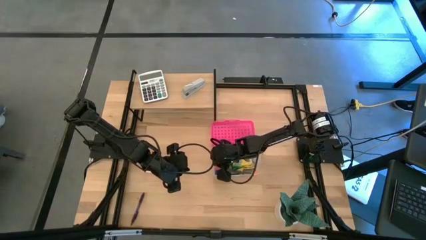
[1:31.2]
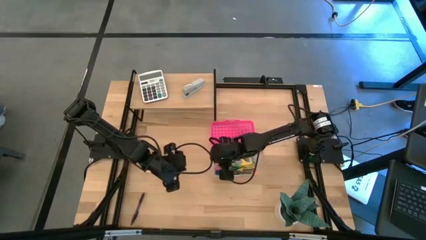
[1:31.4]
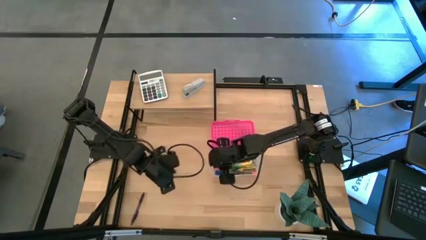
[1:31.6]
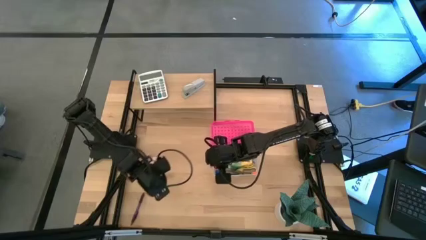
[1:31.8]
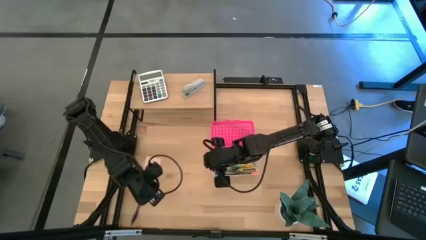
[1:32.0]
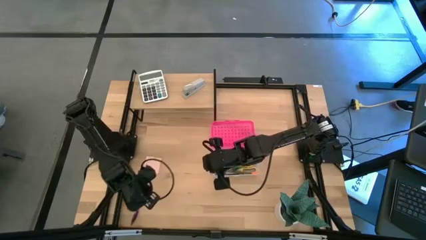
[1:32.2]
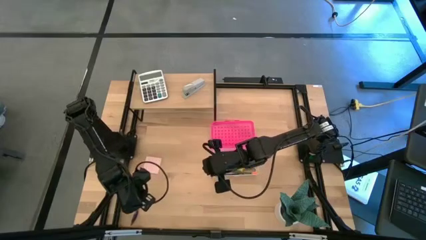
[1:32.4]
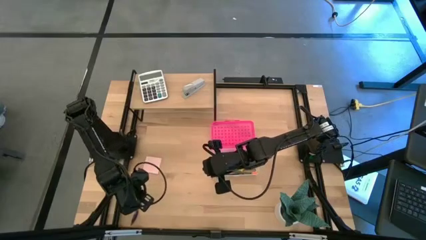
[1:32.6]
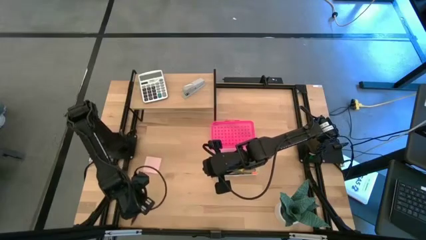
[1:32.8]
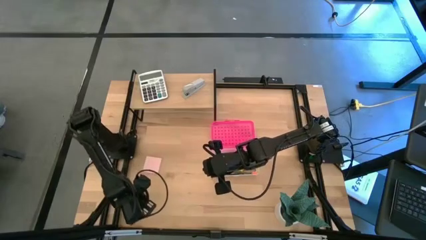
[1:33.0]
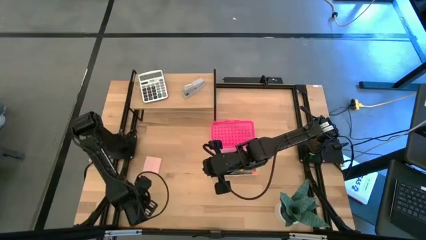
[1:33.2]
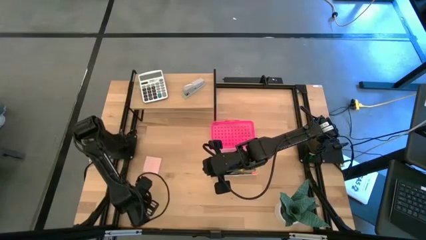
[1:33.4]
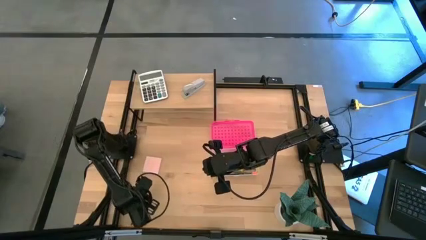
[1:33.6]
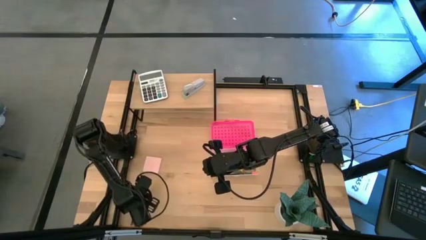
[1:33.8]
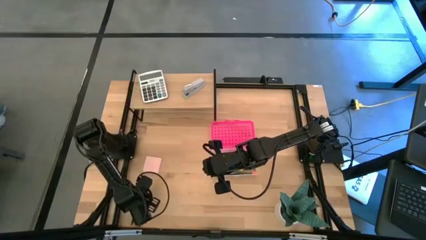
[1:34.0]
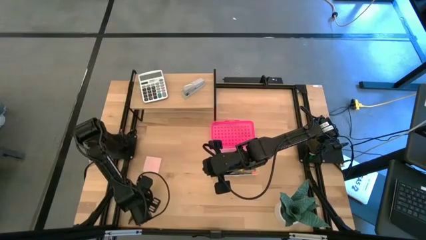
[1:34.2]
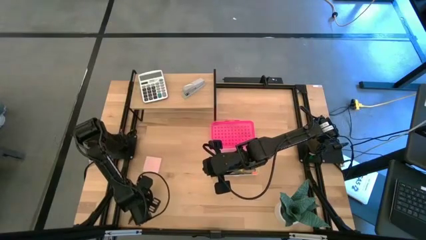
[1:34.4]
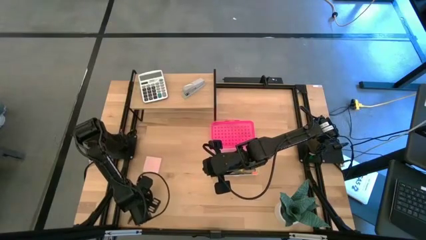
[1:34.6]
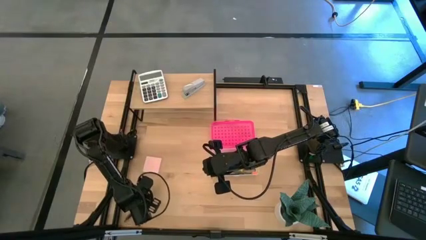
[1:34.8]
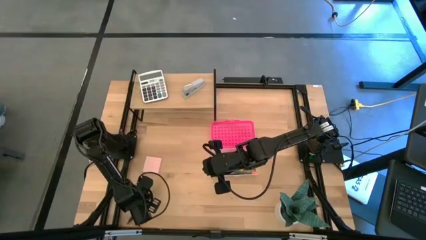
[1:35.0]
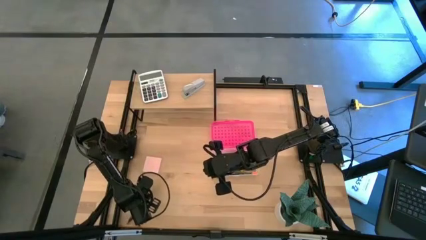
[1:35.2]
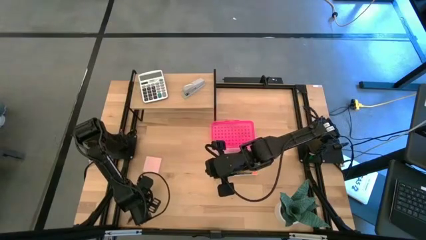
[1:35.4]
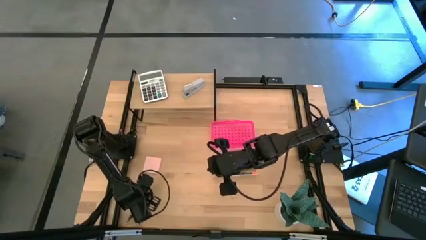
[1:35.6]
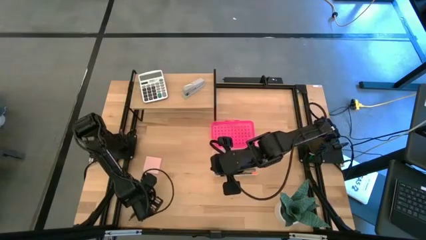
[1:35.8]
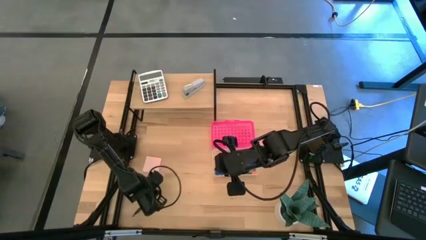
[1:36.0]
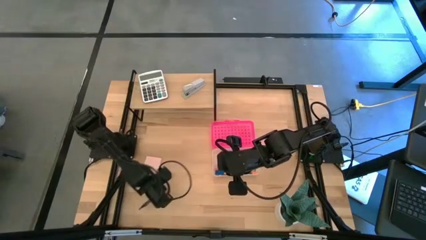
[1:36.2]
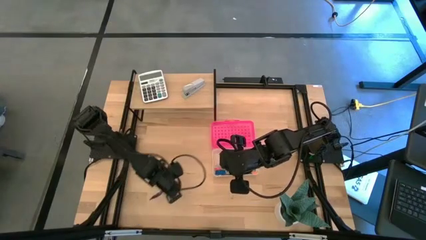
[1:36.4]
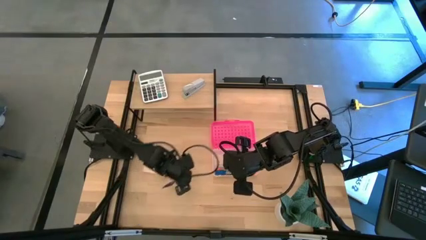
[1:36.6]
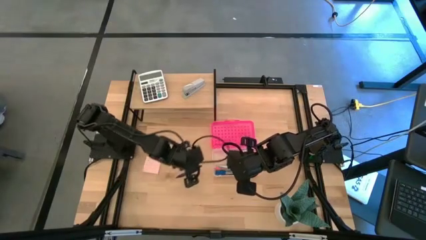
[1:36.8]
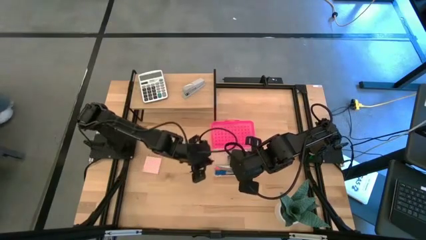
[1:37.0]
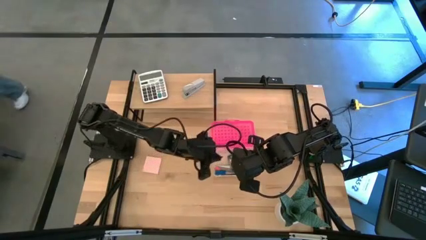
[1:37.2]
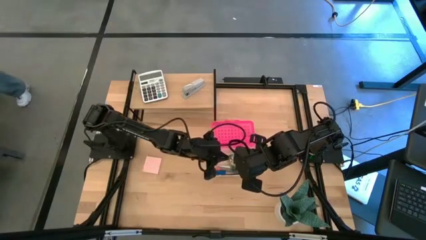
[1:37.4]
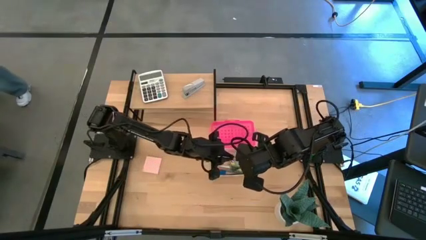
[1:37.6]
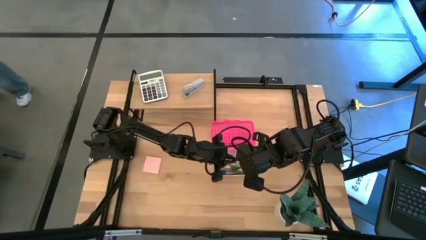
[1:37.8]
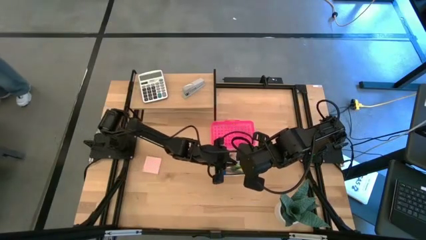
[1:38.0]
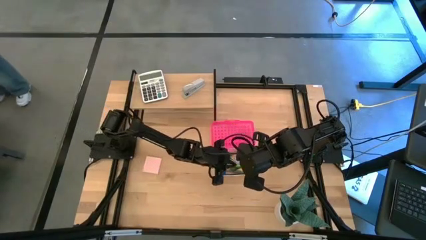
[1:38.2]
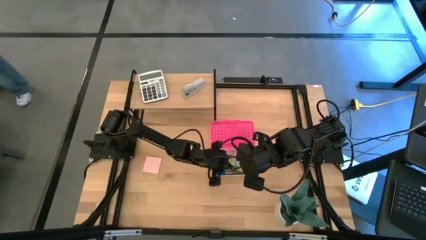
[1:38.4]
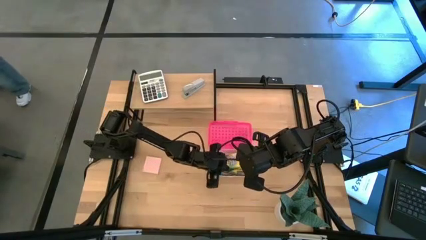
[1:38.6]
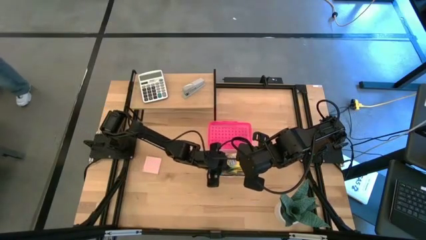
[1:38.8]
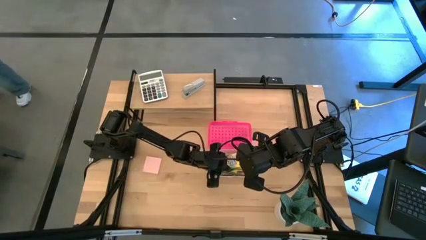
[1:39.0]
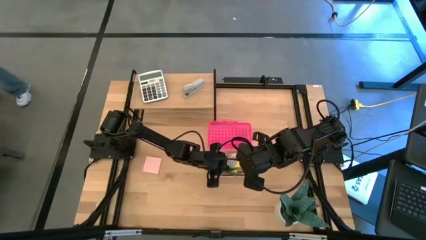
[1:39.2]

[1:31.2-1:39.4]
Task: Pack school essentials
Put the blue pen into the pink supply box

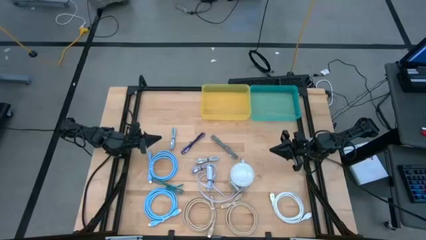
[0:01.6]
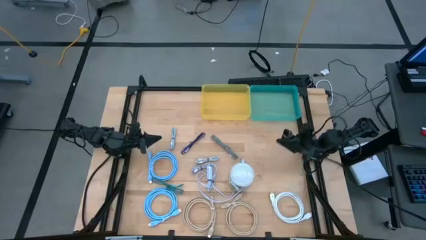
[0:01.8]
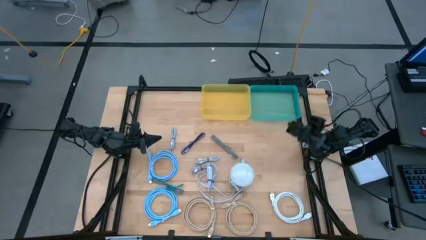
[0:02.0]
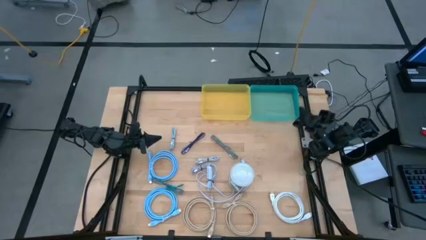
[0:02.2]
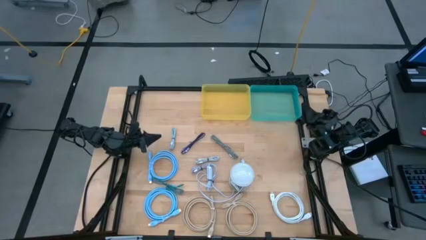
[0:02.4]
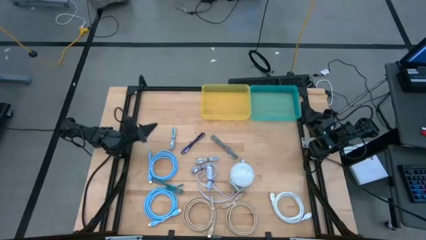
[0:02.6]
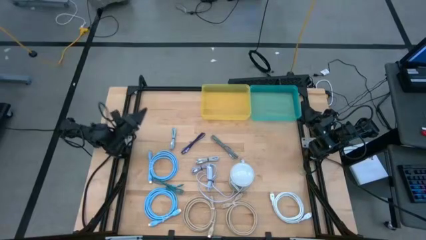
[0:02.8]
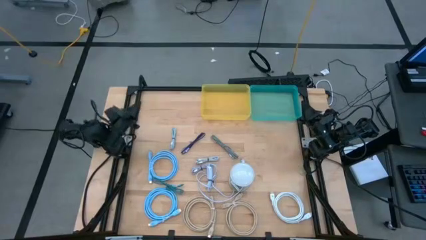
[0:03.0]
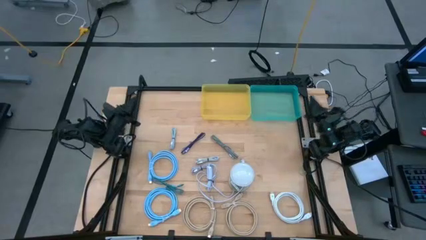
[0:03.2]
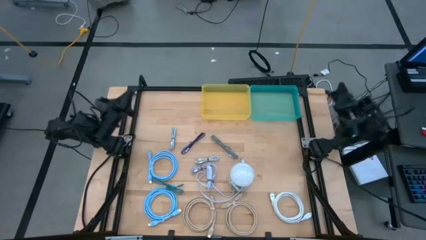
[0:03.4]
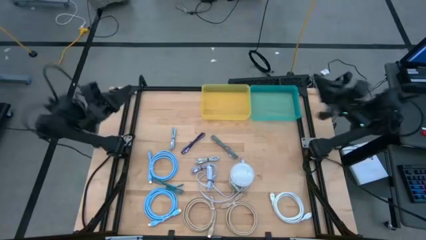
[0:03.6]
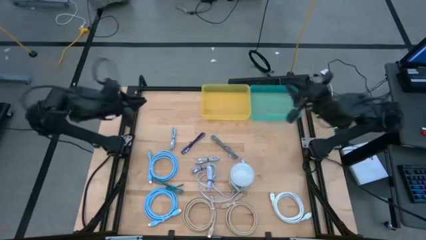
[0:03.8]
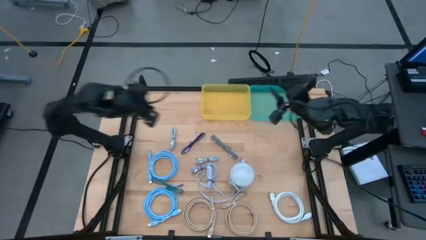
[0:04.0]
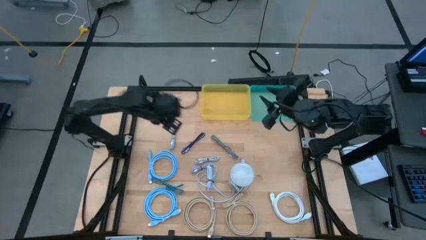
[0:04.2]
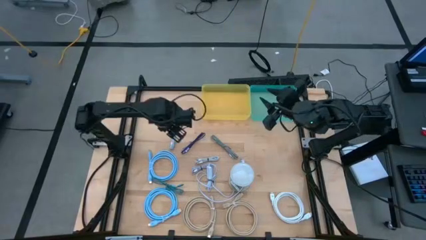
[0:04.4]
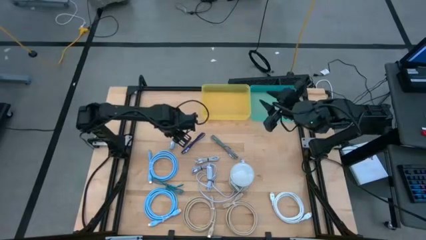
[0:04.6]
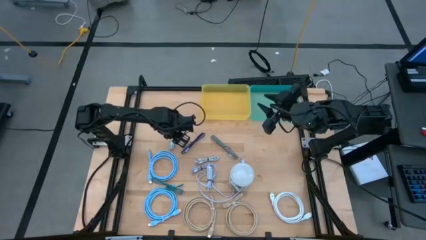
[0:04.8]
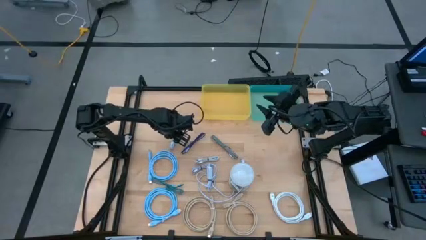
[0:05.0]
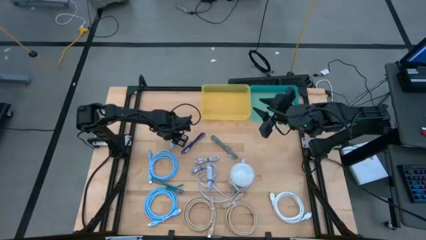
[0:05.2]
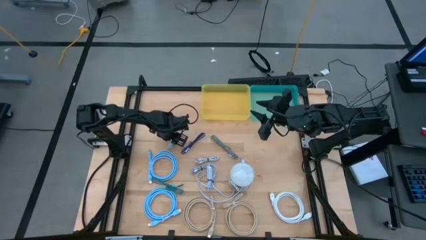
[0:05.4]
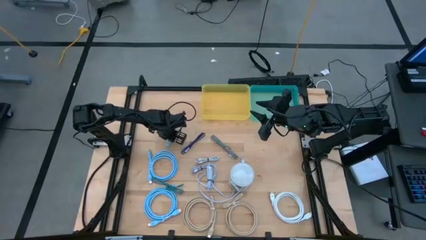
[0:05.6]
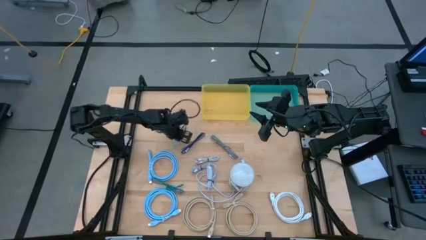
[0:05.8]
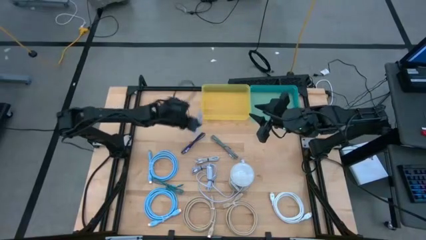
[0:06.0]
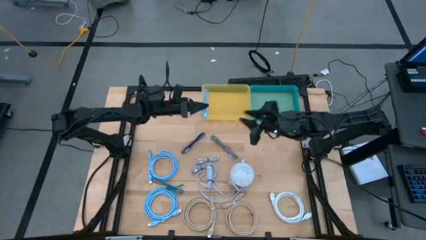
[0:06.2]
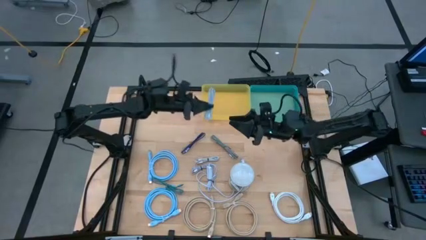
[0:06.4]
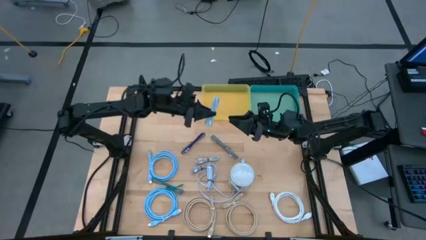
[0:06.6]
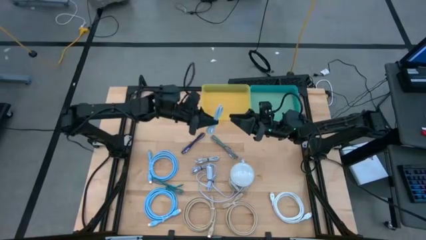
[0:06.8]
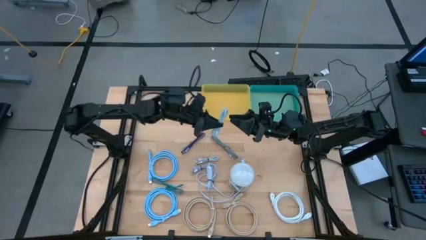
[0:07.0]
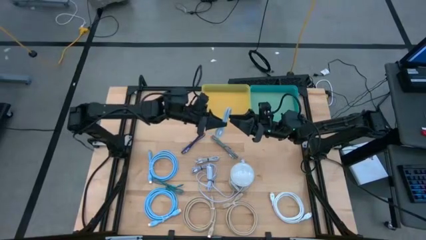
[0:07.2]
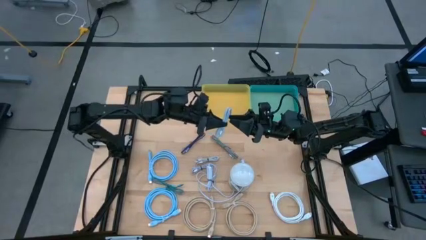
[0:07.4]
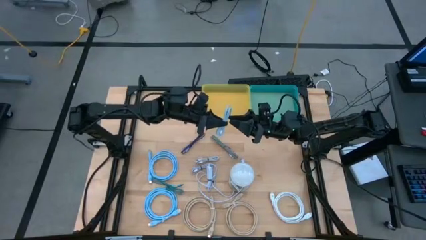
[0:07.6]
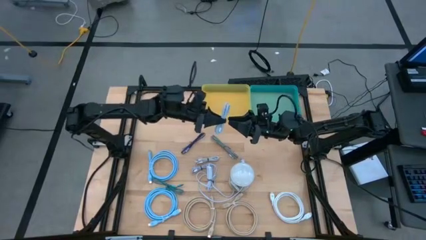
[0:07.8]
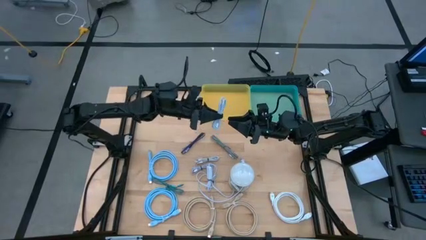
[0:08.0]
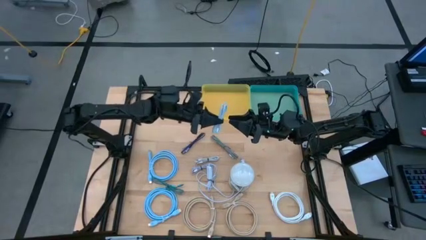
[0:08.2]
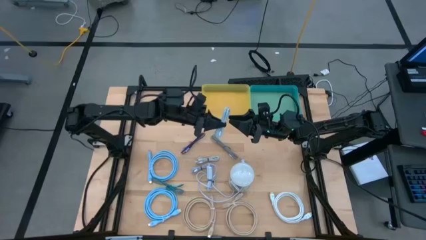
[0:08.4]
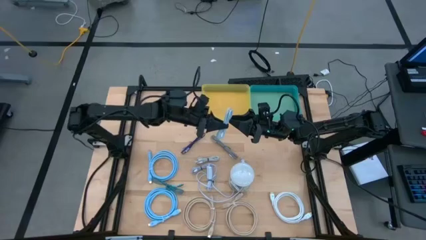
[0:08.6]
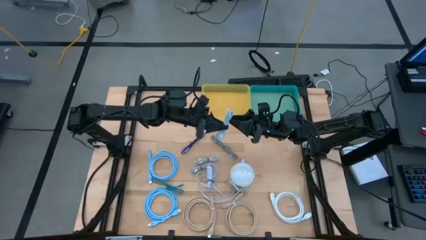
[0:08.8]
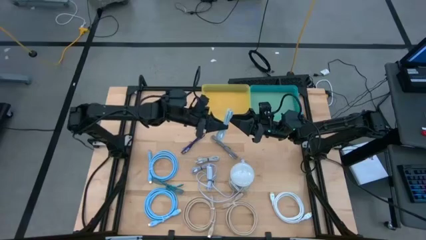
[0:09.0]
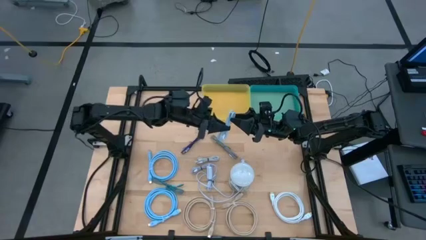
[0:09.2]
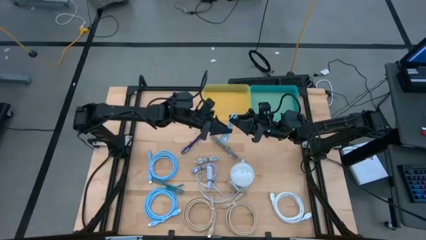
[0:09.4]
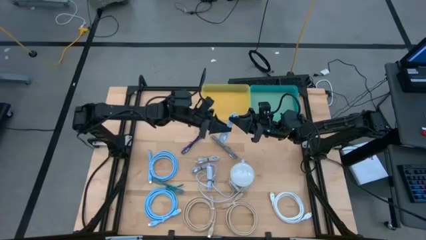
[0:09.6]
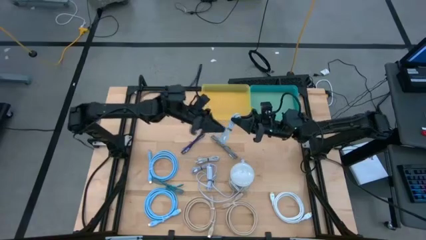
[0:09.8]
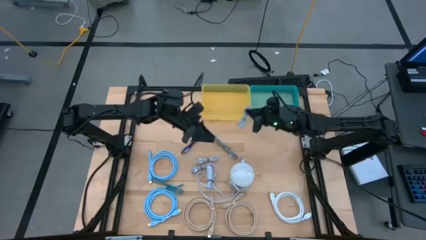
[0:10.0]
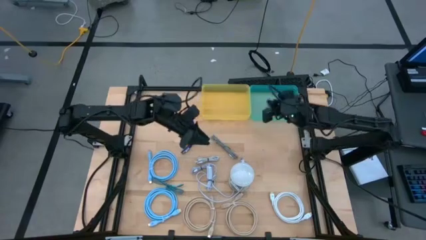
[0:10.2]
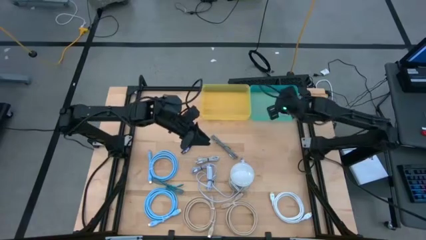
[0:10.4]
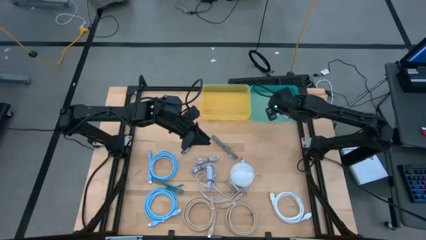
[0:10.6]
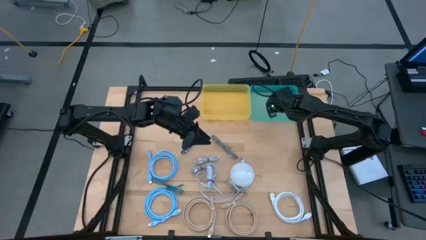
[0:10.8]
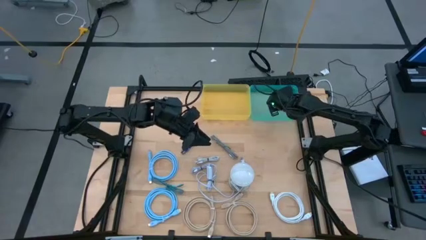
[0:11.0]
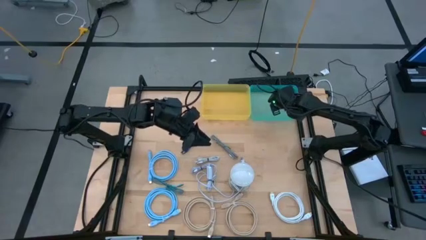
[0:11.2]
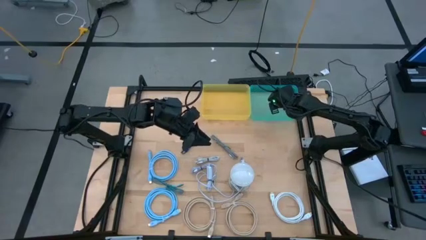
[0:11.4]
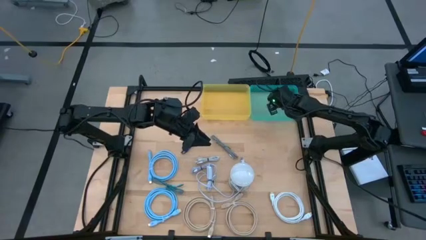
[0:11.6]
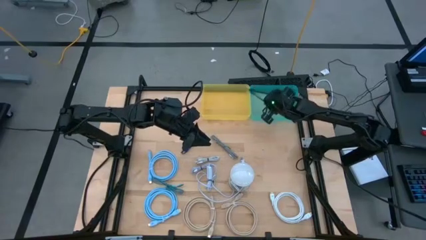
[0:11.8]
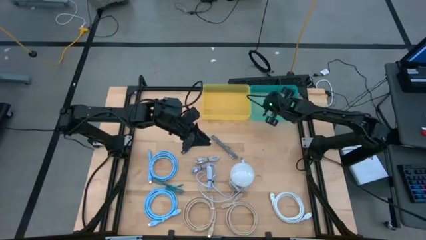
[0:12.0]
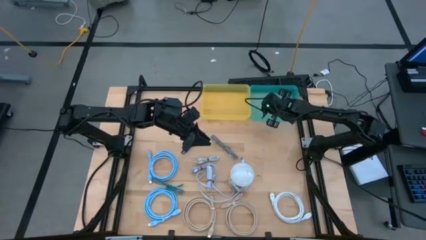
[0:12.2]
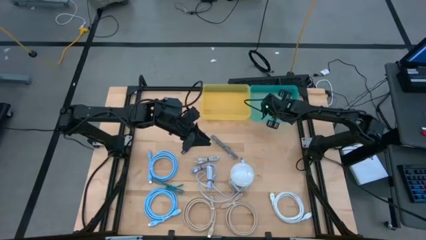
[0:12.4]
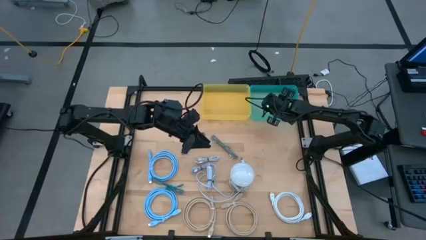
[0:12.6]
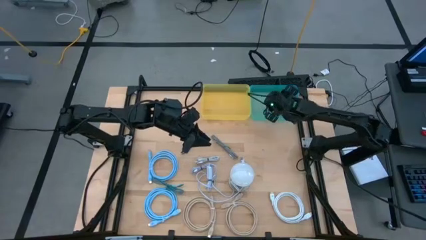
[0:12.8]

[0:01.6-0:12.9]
Task: Pick & Place USB Port
Put the top blue charger cable into the green bin
